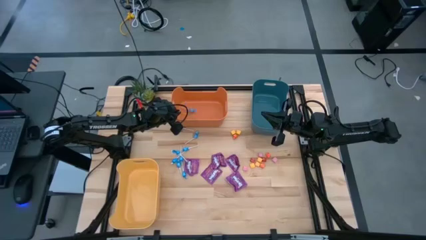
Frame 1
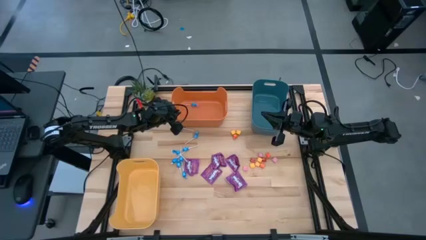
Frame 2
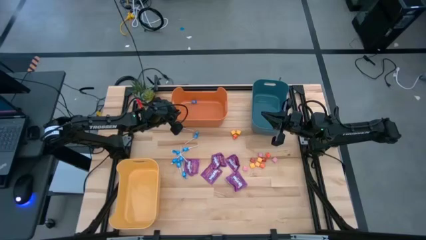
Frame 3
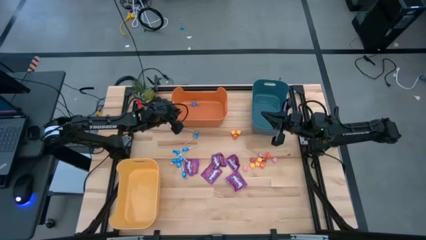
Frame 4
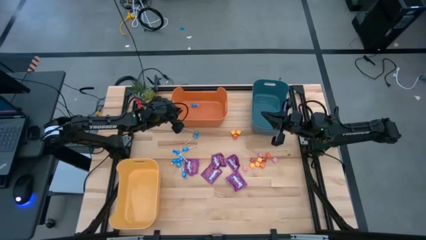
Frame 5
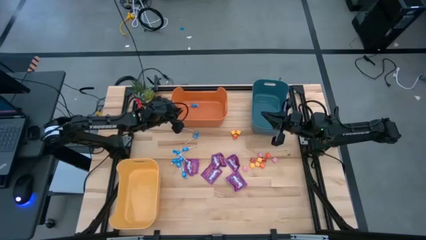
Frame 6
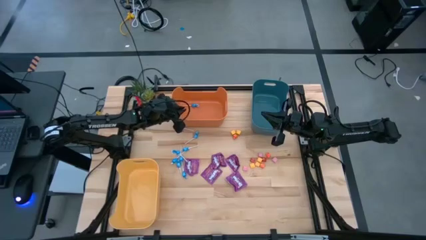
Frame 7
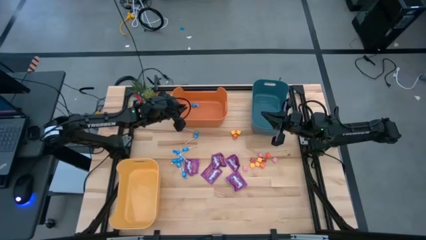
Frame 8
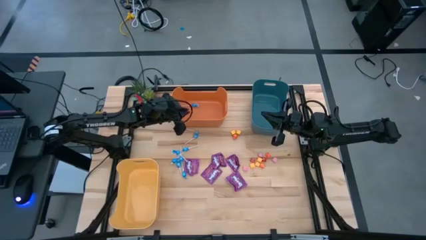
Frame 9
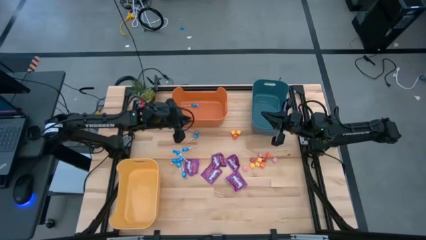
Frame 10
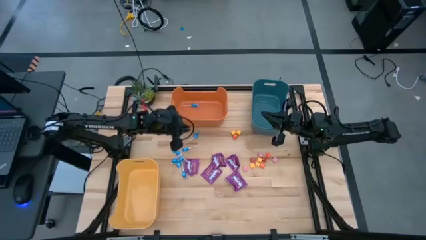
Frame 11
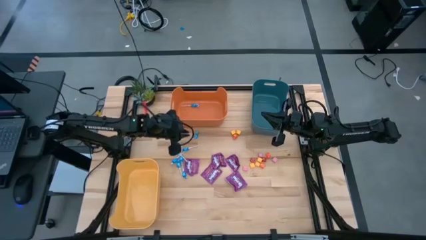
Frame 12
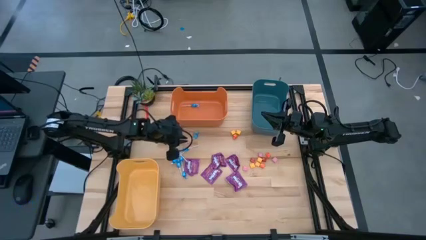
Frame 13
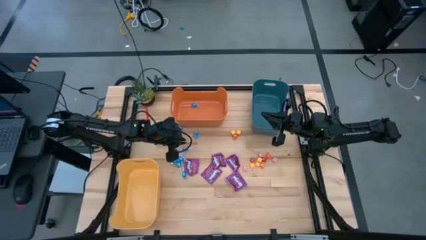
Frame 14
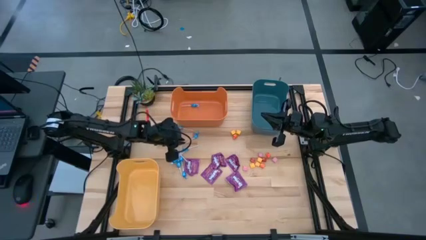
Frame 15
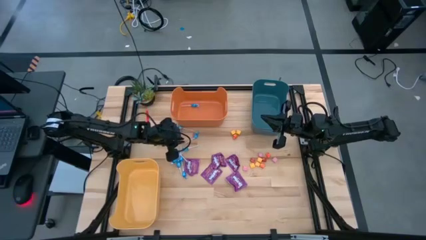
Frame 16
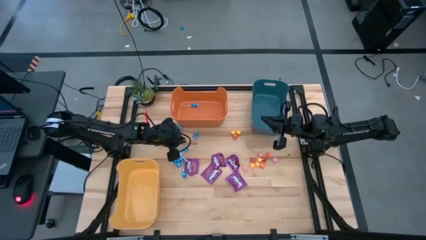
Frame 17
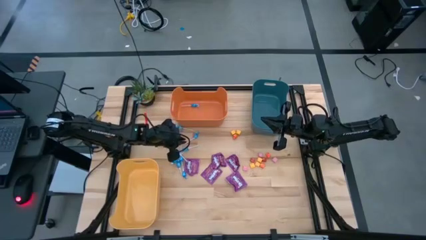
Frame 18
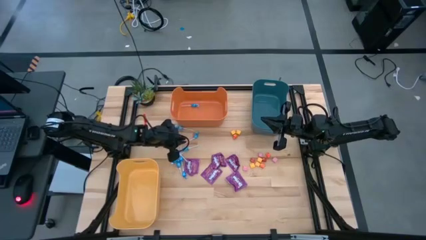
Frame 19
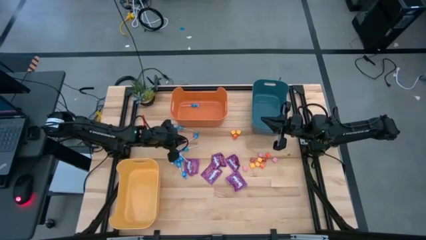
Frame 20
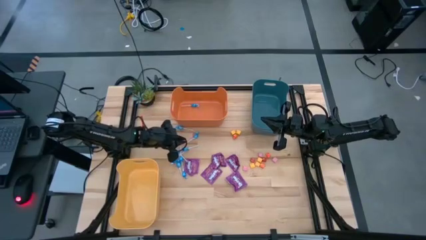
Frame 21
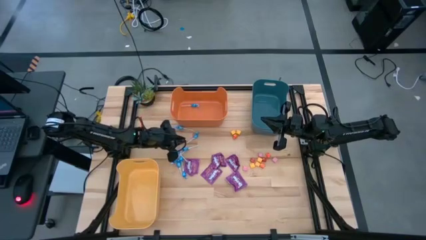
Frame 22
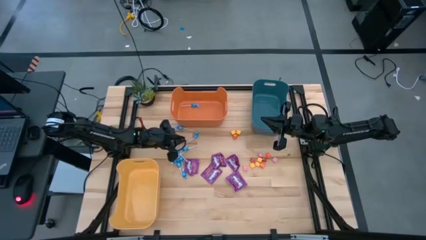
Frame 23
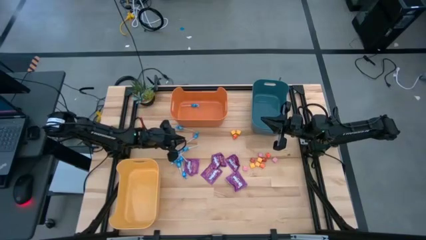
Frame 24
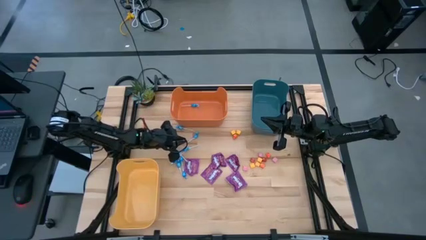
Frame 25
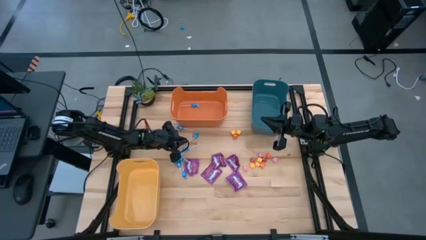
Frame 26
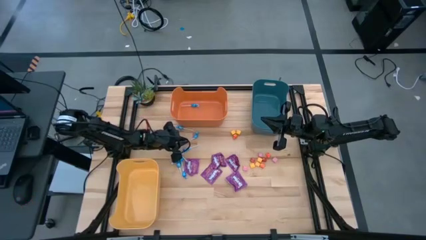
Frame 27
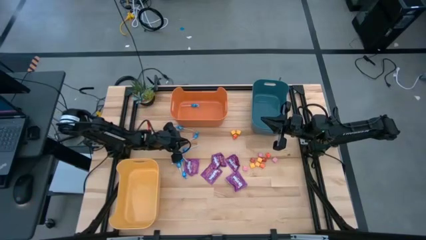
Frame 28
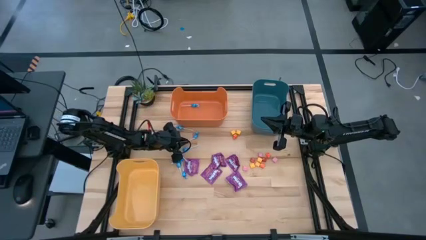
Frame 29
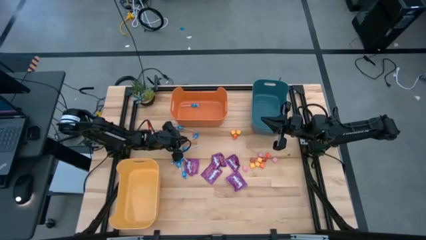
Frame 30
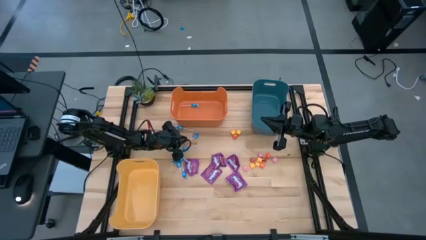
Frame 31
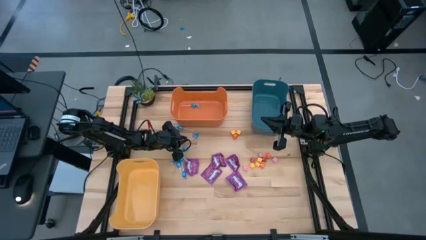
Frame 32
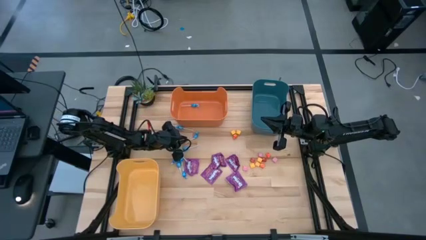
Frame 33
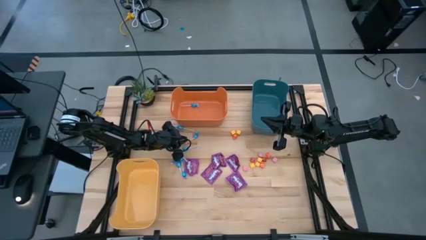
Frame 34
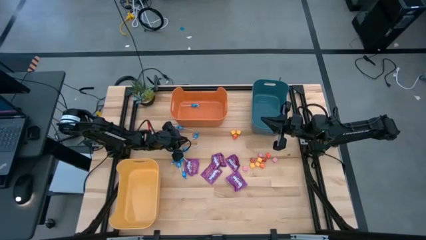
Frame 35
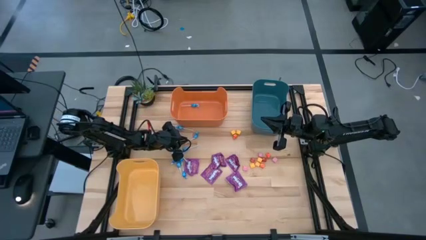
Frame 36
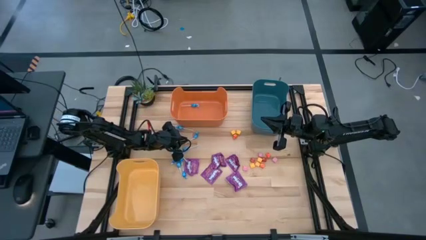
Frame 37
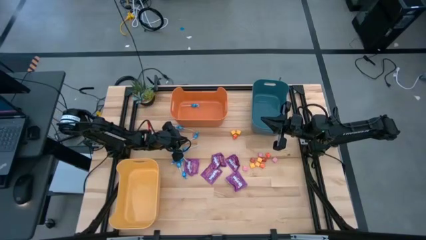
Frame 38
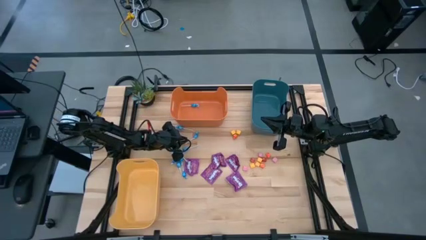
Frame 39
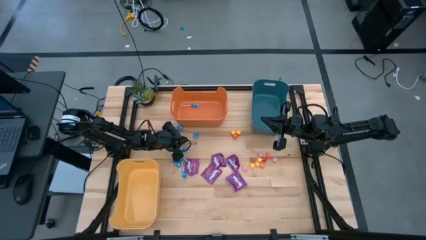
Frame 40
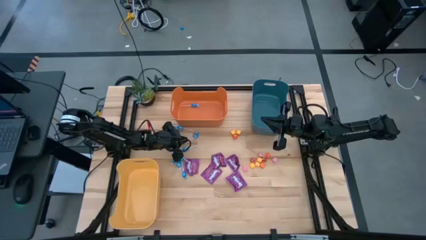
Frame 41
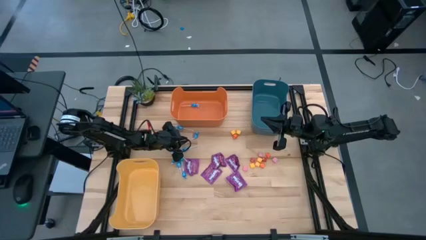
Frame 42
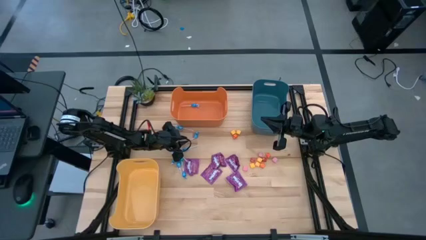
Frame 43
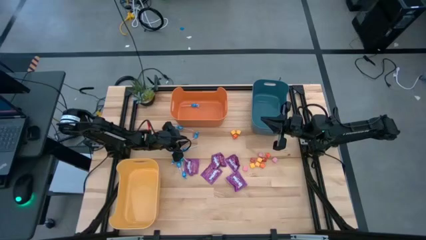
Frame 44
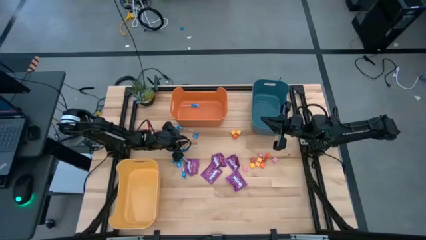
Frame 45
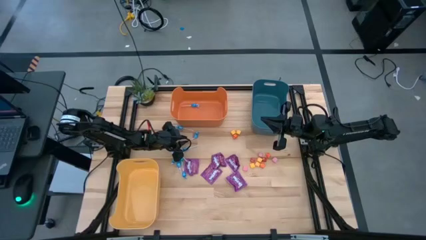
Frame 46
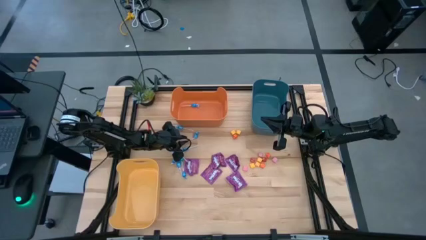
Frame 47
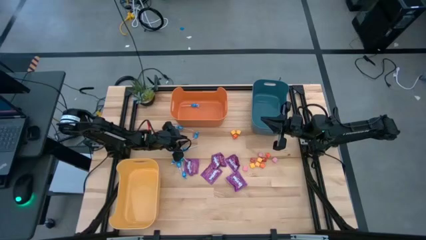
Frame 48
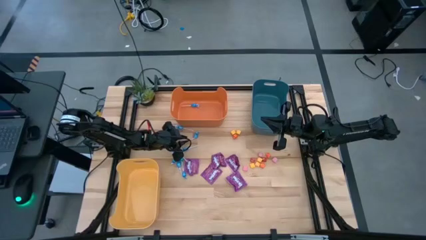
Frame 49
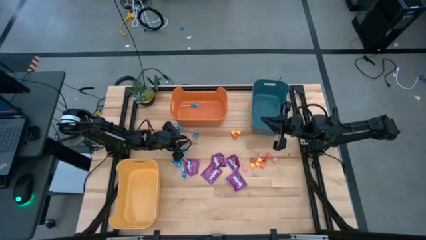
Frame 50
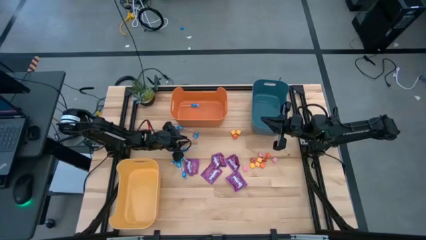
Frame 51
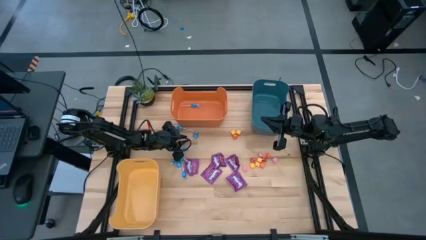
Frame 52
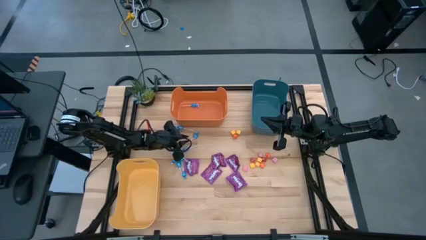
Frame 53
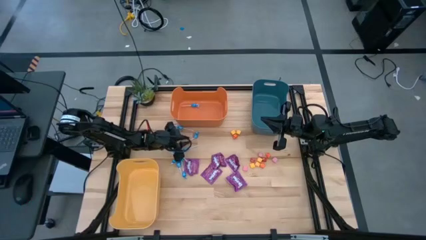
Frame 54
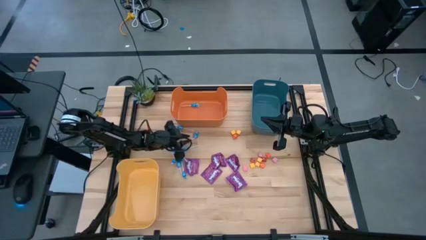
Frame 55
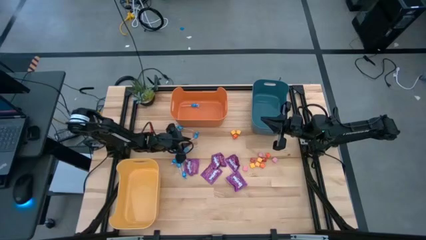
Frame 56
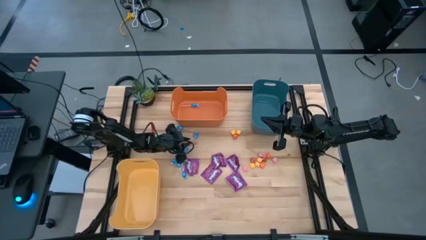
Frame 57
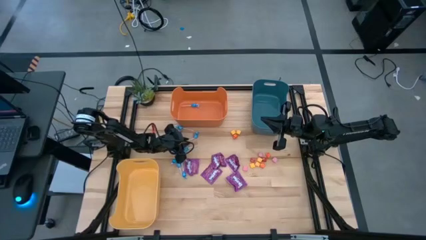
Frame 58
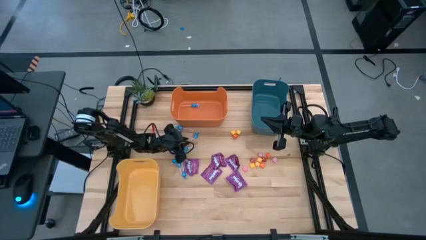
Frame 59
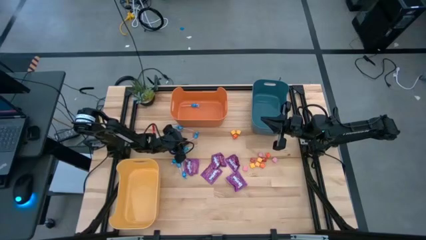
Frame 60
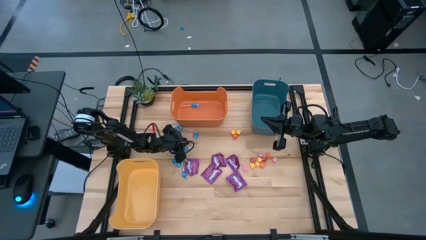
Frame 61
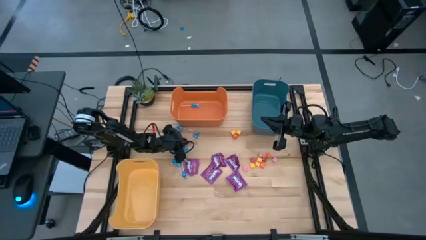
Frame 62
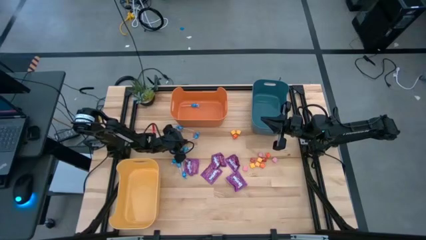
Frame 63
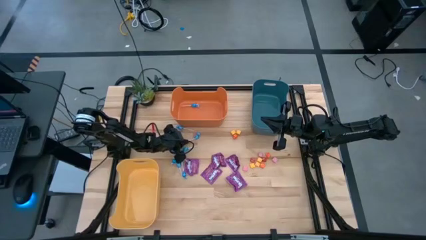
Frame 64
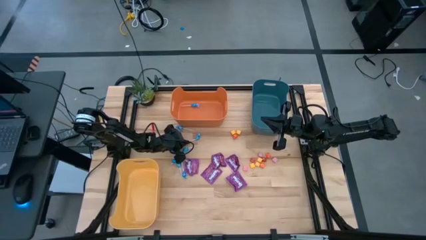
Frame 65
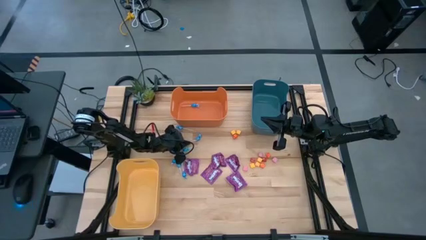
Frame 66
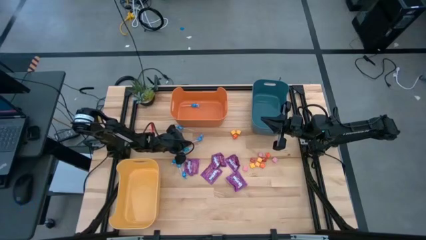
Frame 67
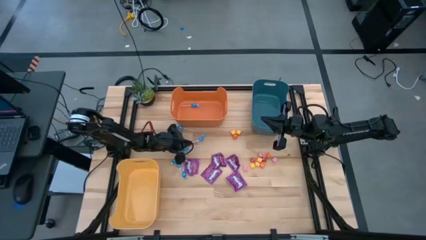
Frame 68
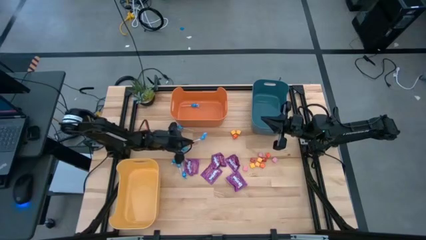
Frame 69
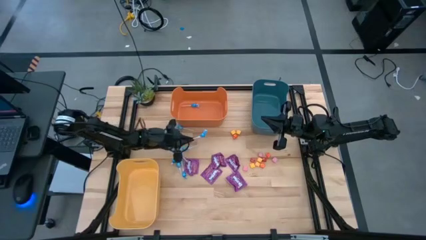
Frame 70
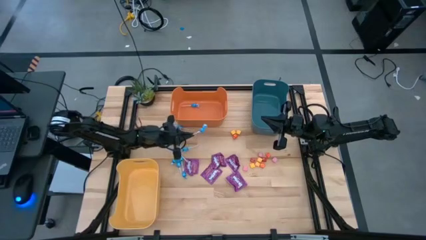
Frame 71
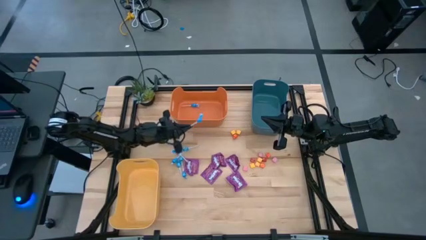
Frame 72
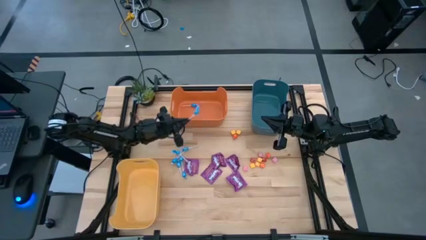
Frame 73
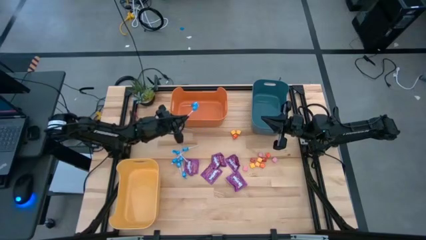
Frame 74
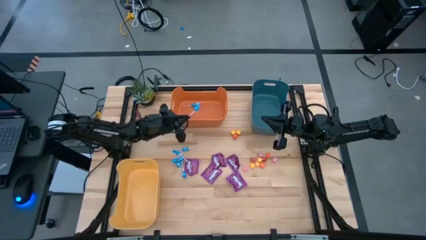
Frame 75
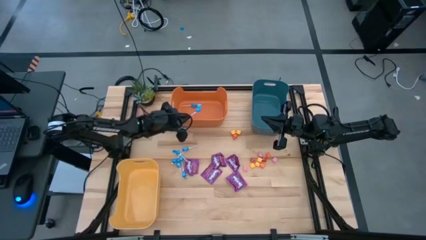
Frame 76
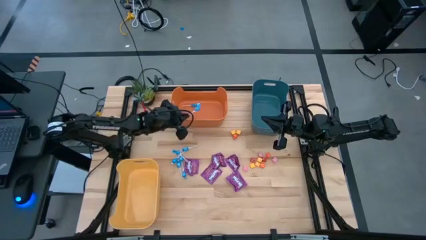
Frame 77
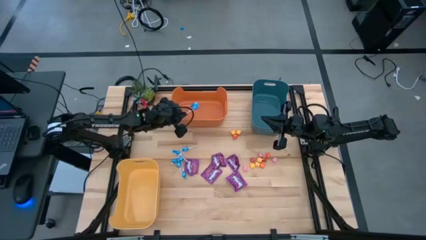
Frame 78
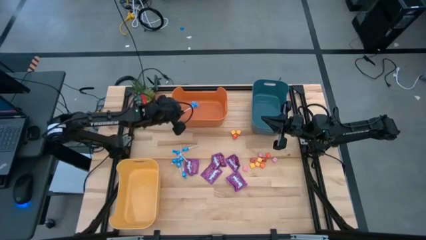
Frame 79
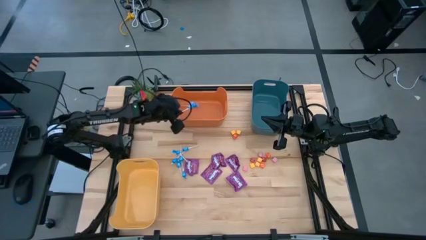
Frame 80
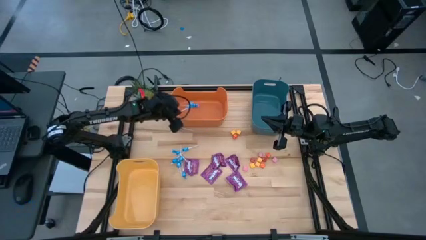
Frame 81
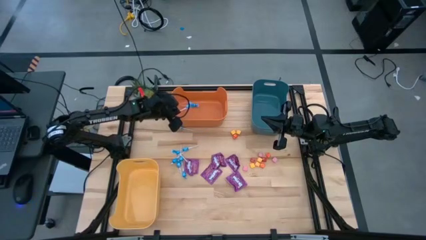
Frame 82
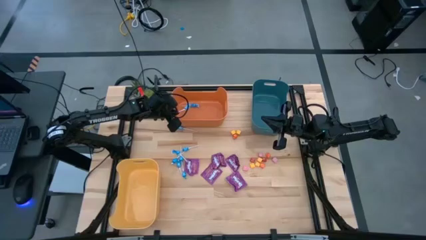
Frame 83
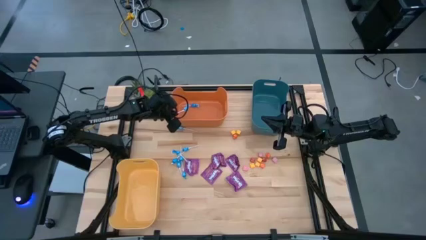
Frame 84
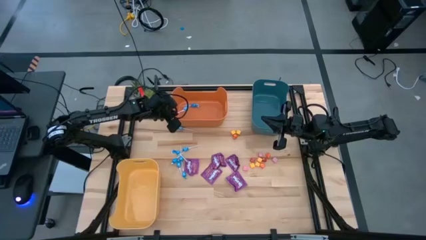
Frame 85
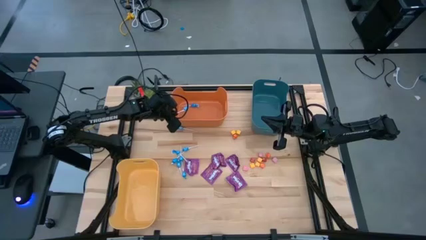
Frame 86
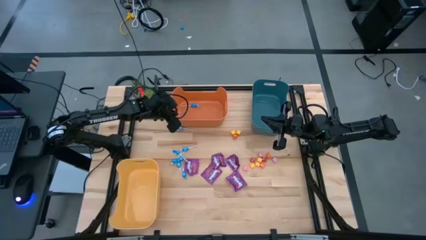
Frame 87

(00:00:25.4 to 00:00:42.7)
Task: Sort candy
Put the blue candy into the orange bin
